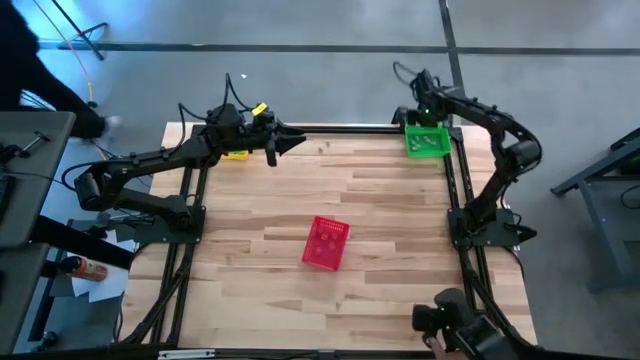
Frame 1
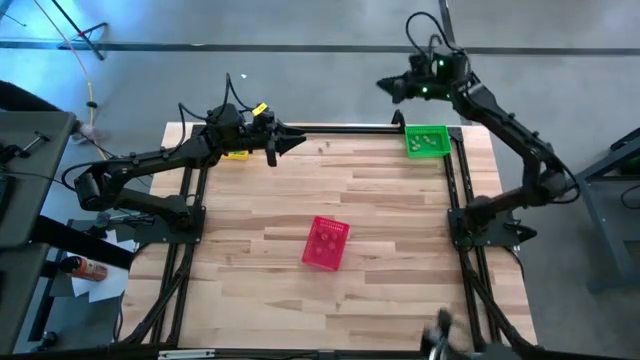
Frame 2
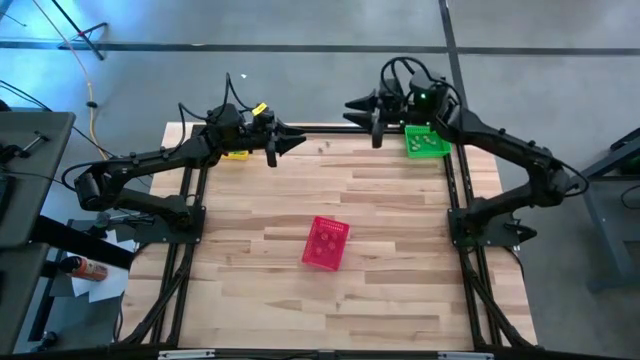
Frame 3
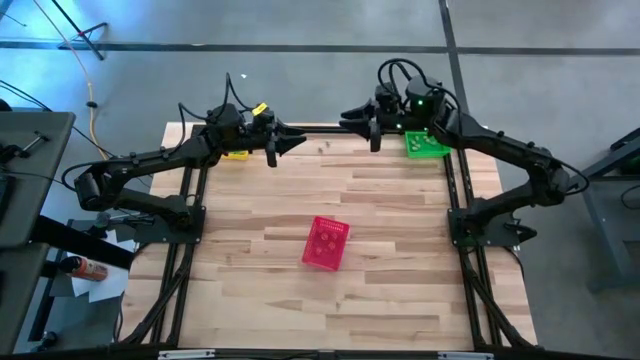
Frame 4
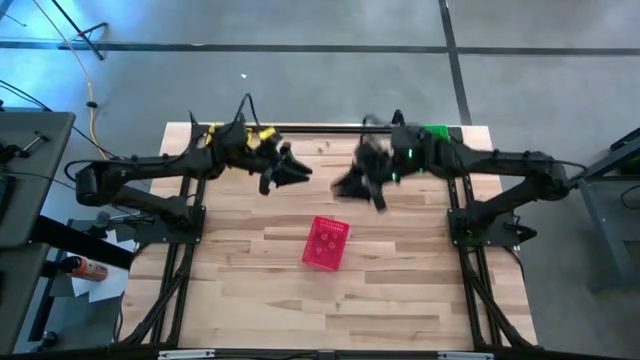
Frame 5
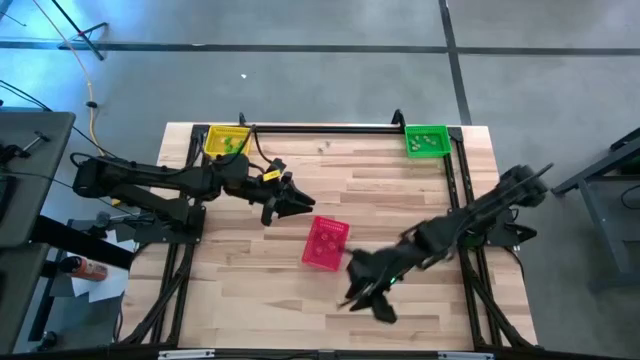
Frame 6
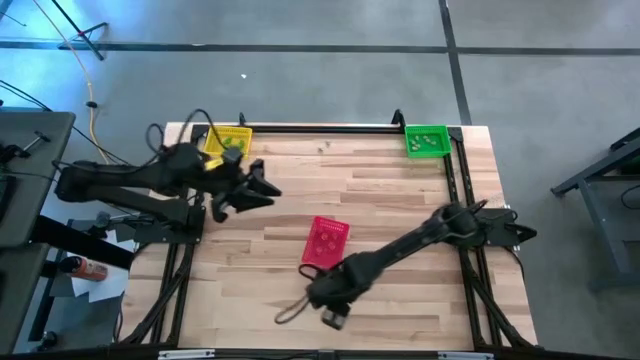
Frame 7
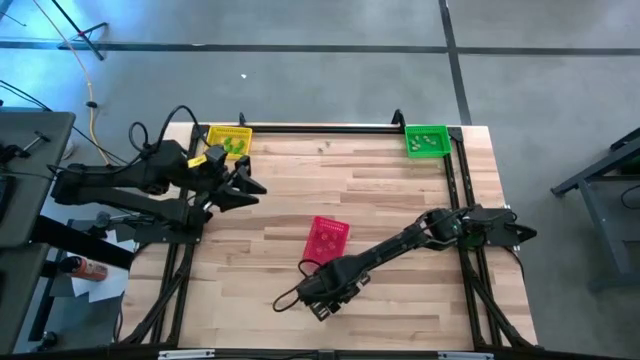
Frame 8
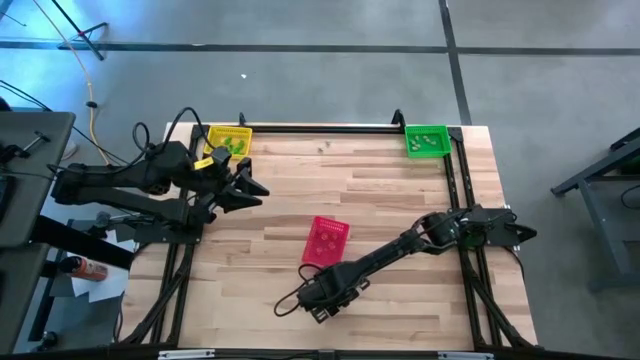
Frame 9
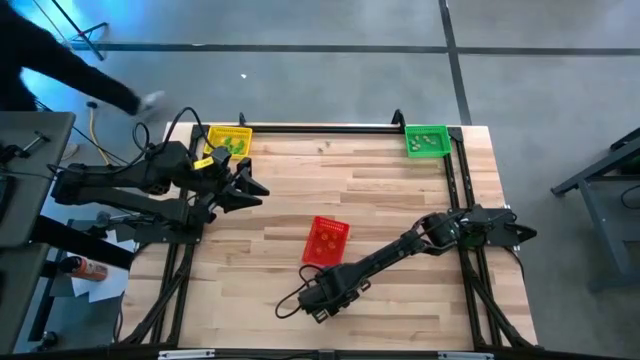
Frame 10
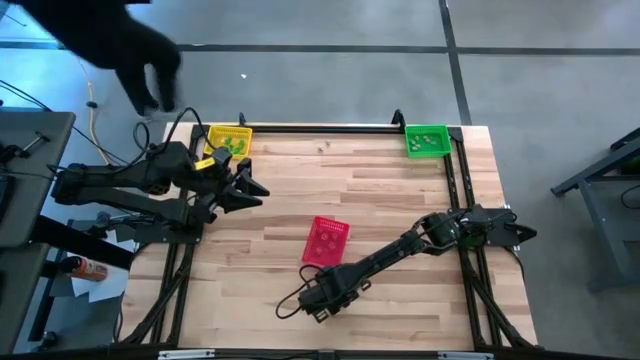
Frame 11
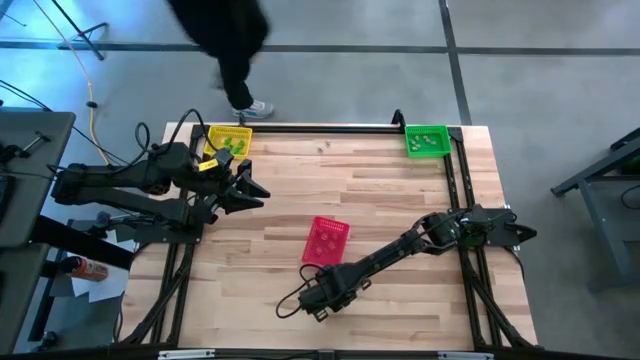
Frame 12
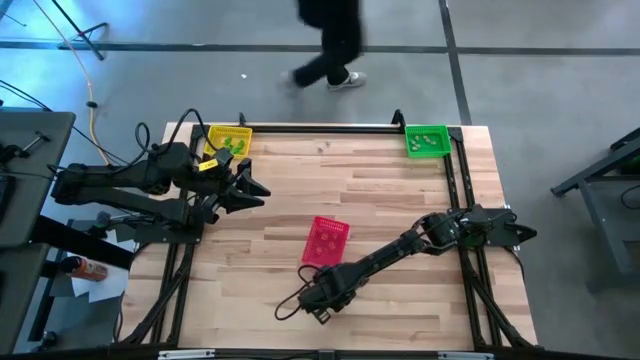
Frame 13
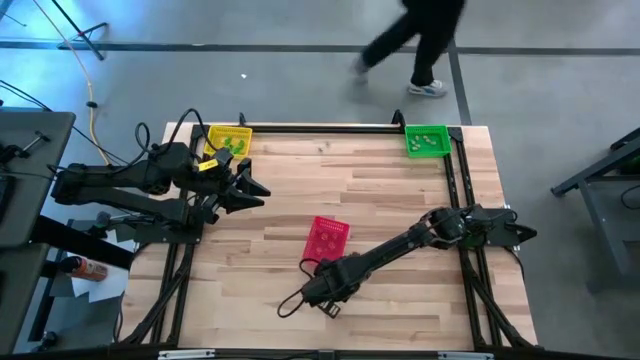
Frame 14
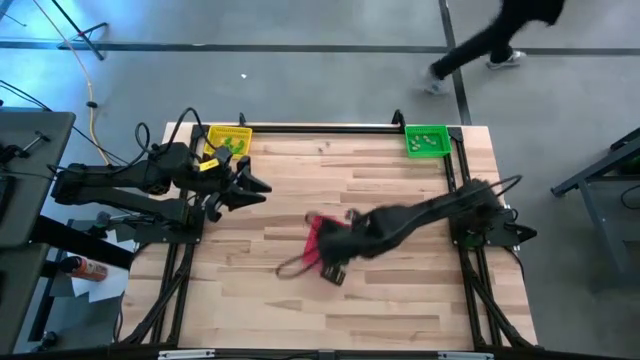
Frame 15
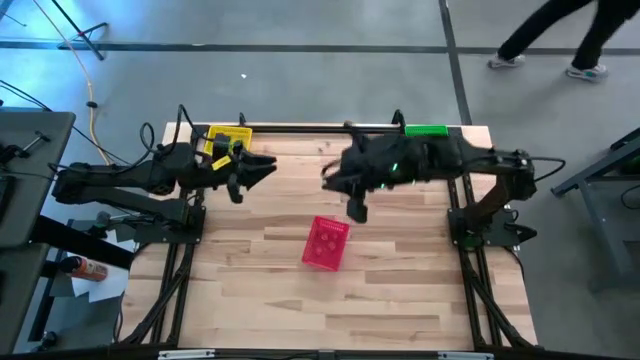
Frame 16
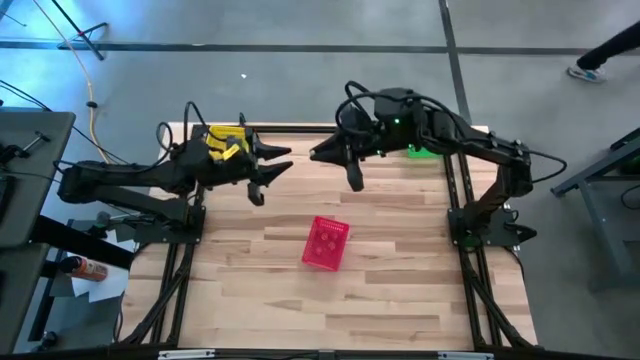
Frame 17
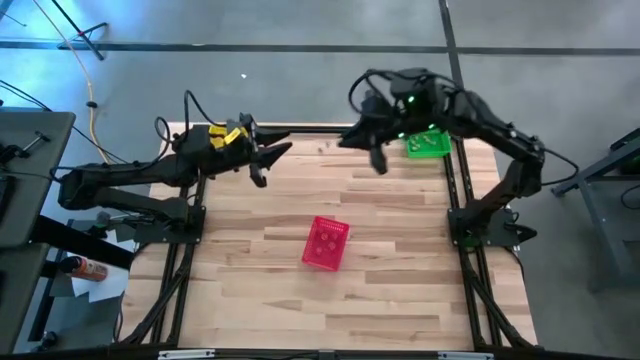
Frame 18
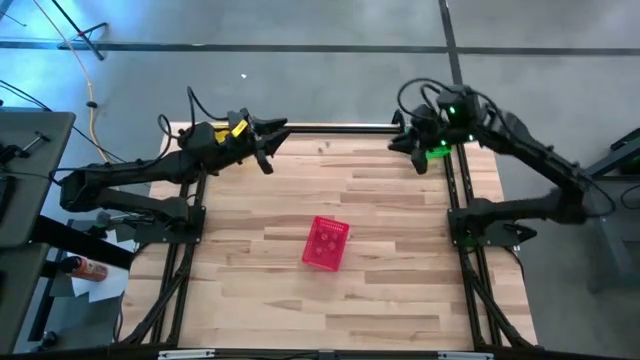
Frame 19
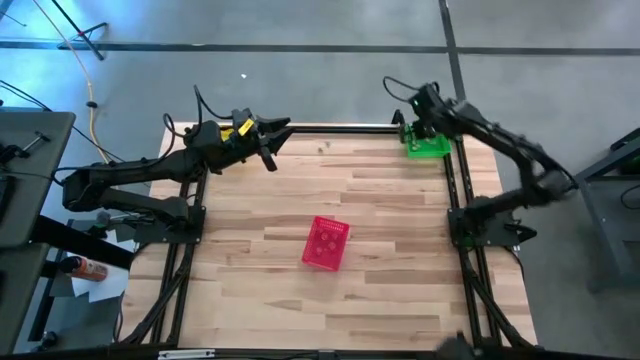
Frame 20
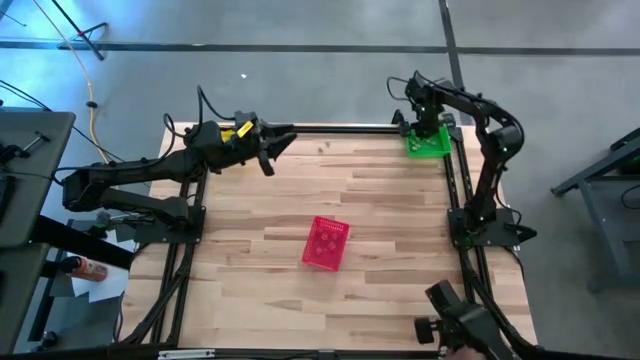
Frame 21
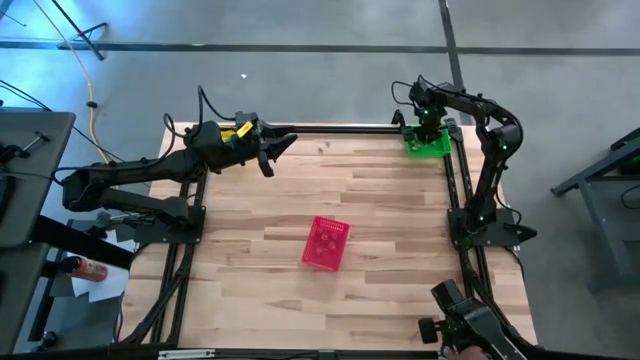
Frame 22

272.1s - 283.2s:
Task: Sort Halloween decoration
Put the white skull toy into the green bin

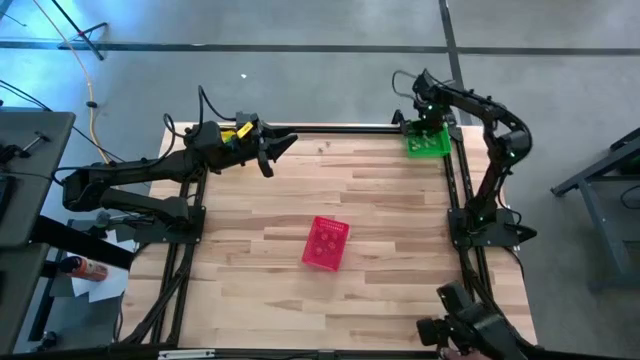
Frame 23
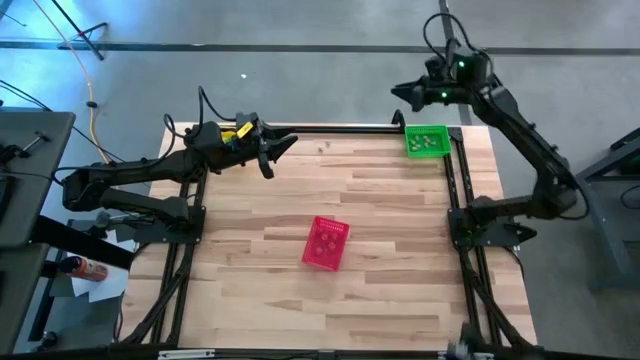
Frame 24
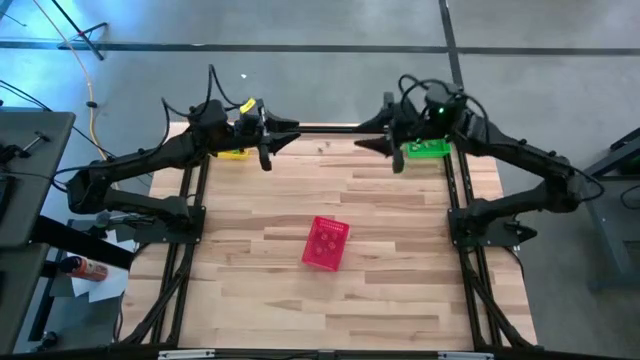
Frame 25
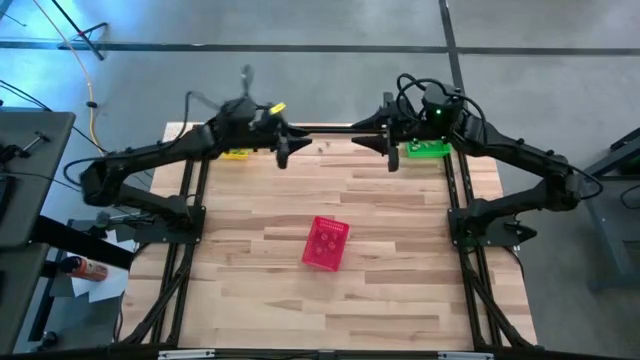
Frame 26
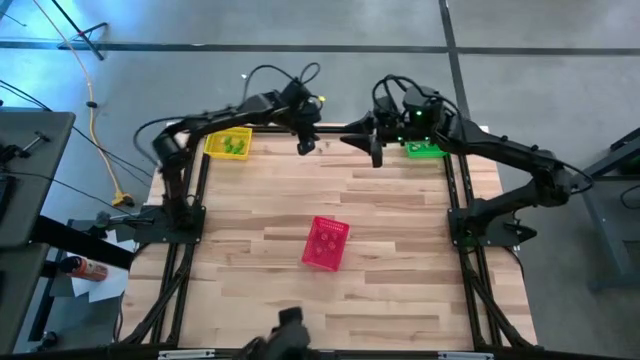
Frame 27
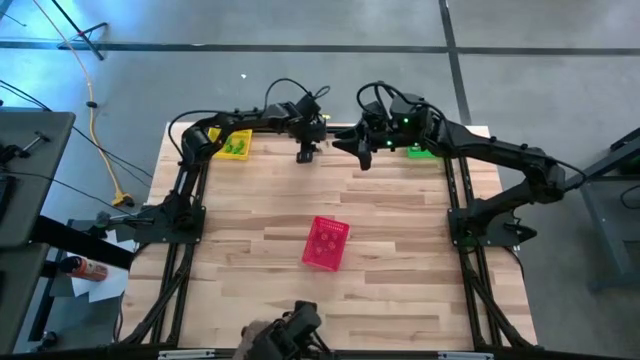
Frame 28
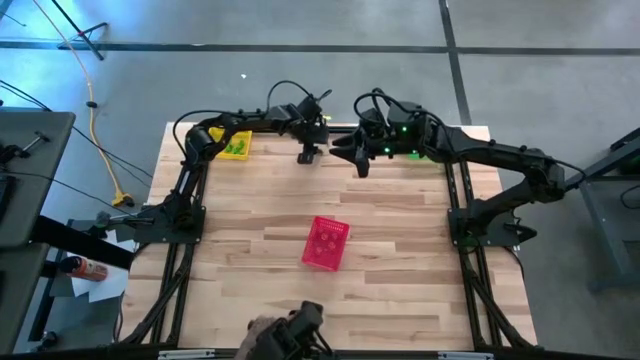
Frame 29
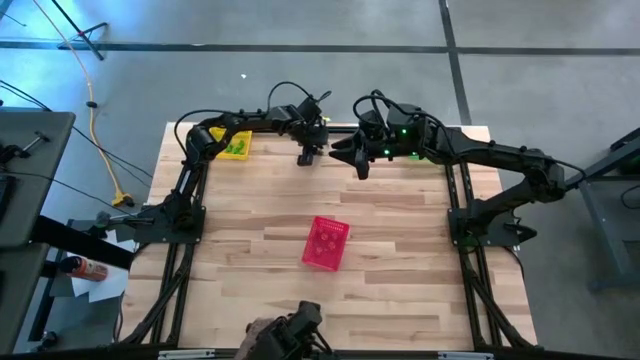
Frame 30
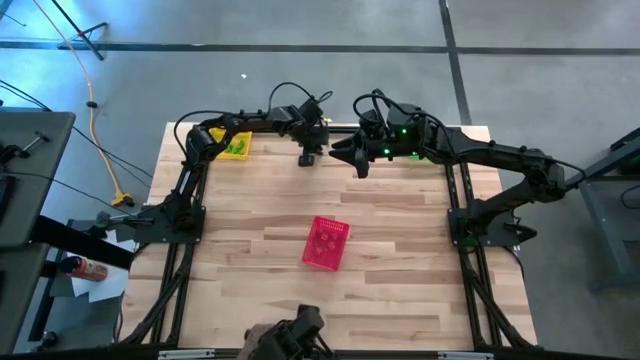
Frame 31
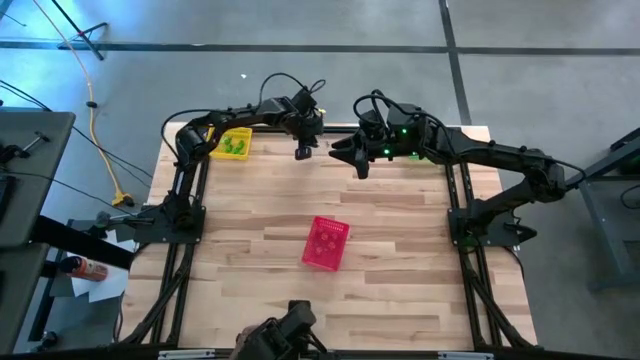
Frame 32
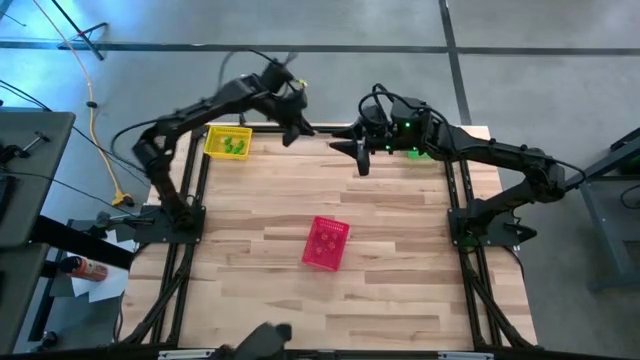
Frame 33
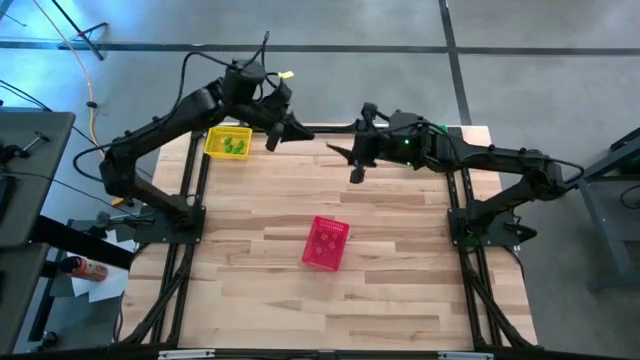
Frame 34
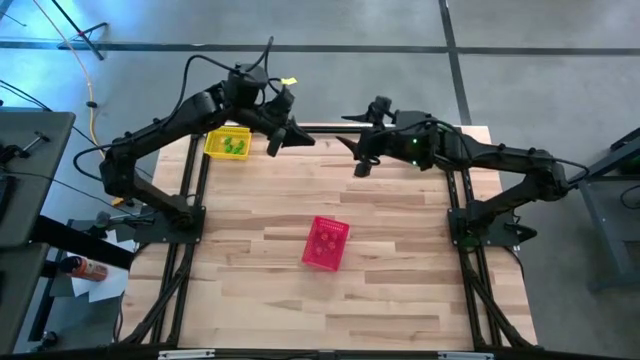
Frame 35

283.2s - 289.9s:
Put the white skull toy into the green bin

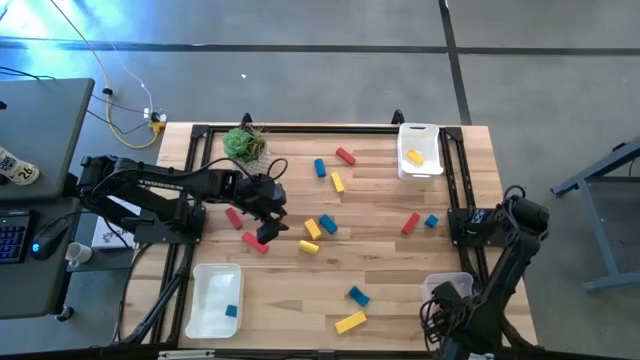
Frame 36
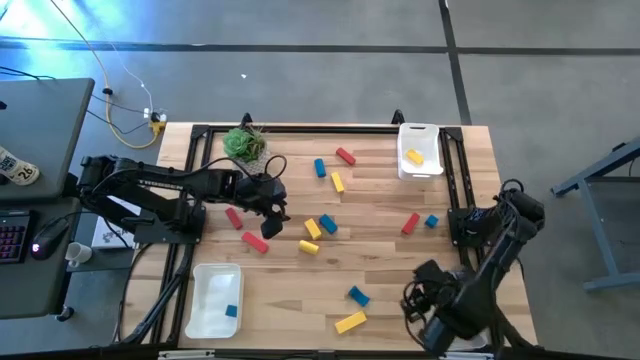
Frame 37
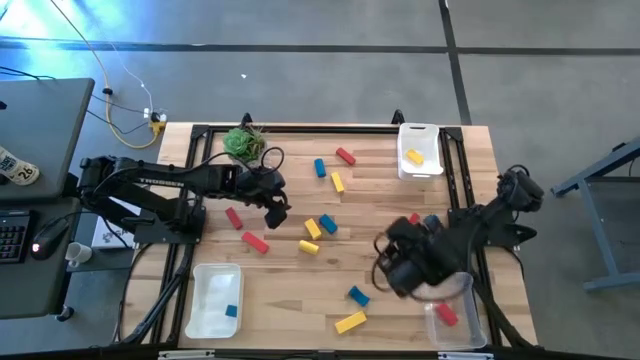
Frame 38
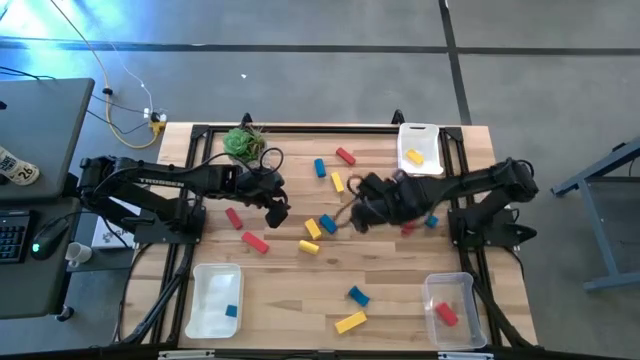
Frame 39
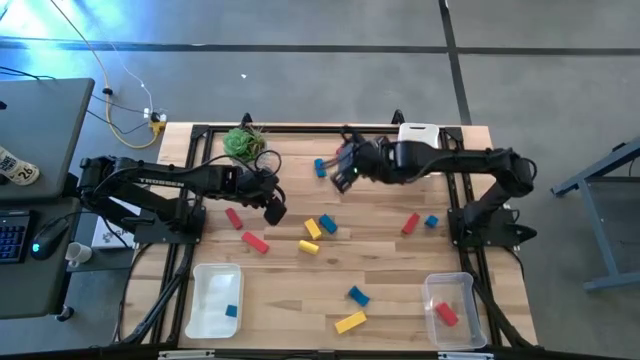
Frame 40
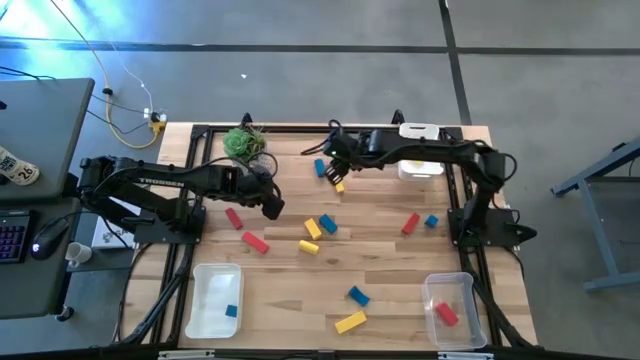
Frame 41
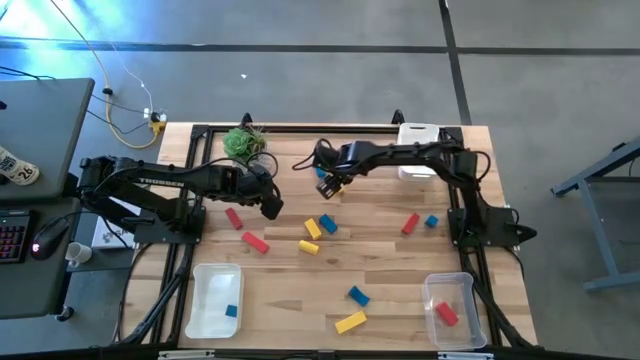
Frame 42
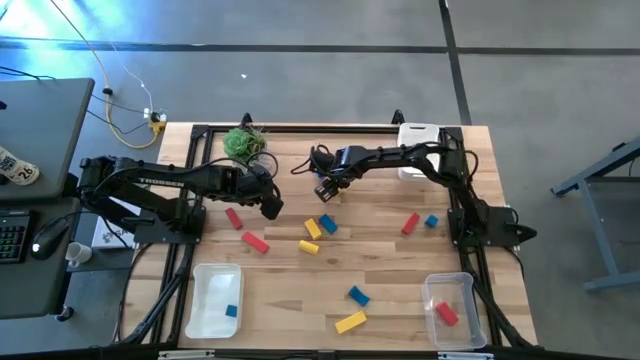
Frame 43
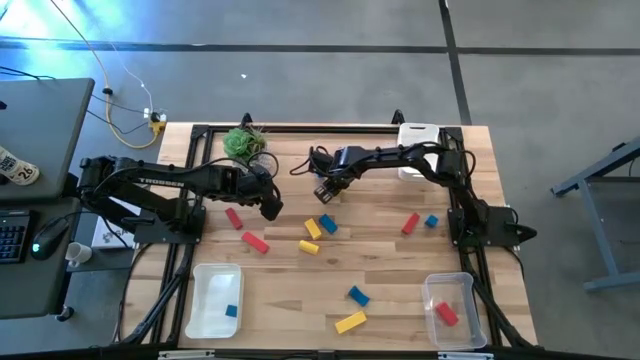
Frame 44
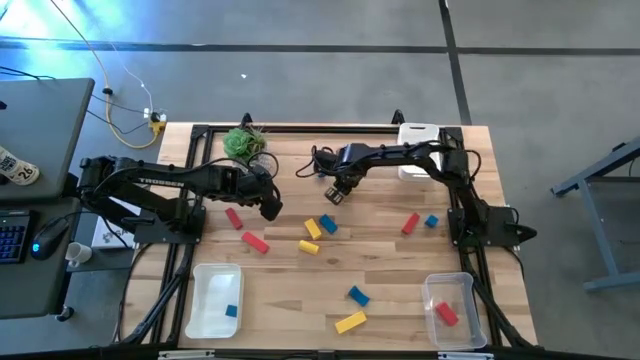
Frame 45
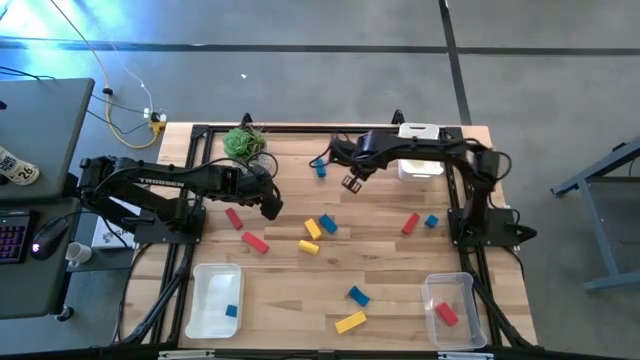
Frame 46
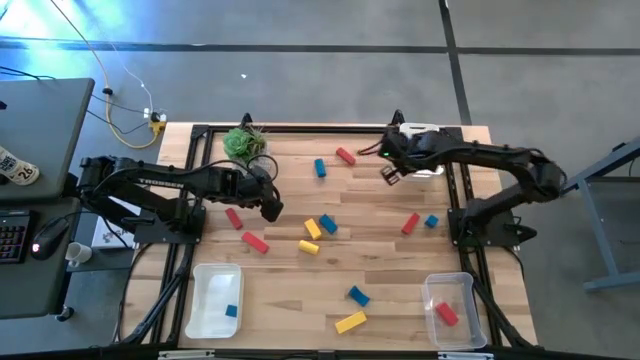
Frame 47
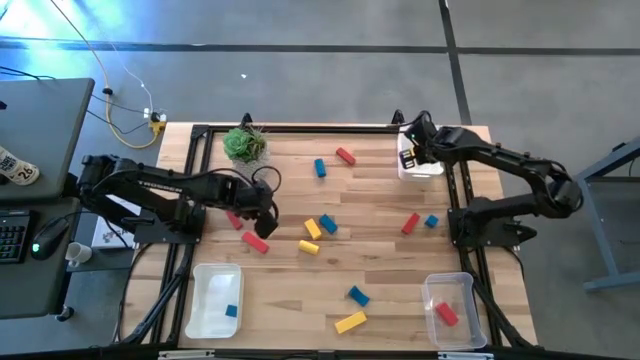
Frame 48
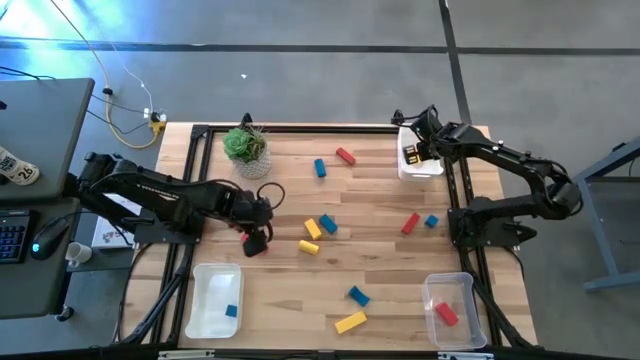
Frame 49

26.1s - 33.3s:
Task: Sort & place blocks by color
Put the yellow block into the top white bin
